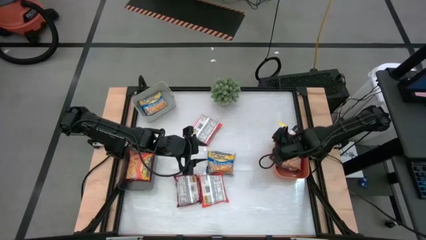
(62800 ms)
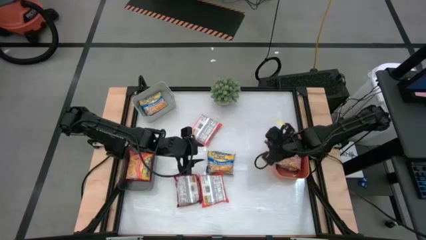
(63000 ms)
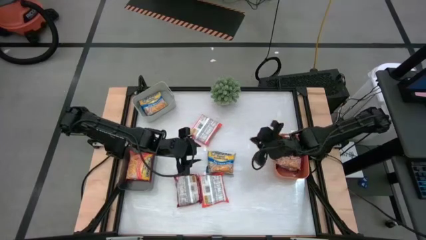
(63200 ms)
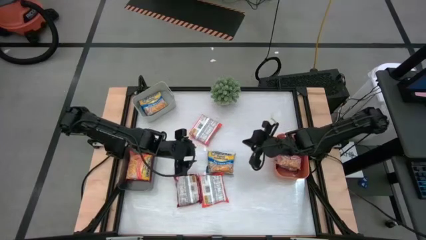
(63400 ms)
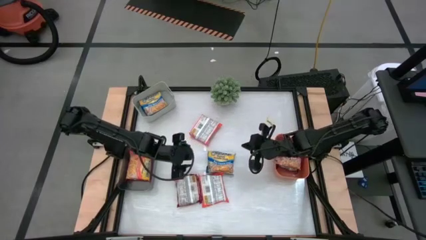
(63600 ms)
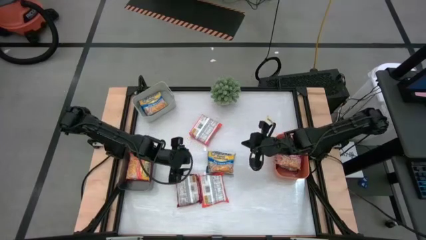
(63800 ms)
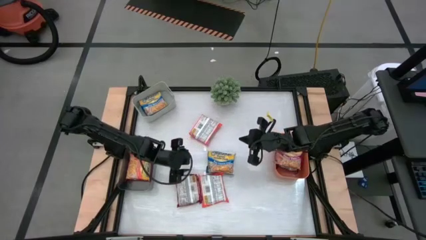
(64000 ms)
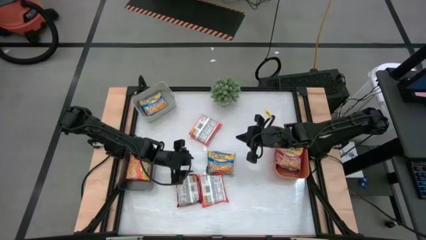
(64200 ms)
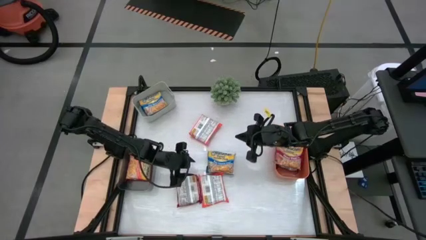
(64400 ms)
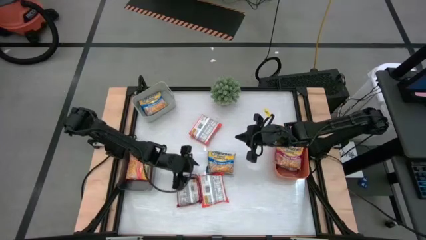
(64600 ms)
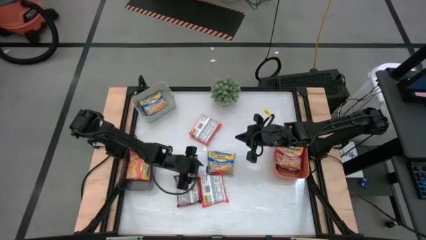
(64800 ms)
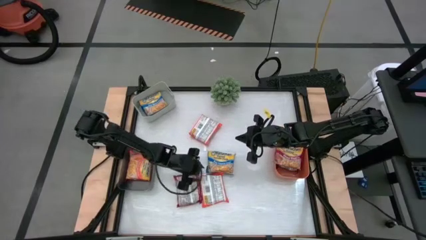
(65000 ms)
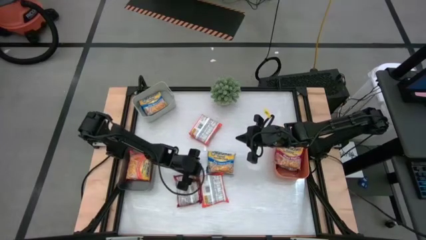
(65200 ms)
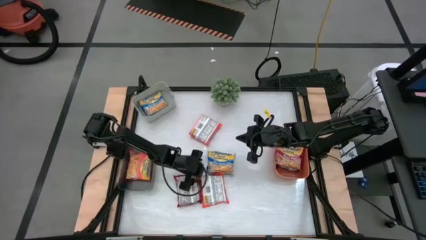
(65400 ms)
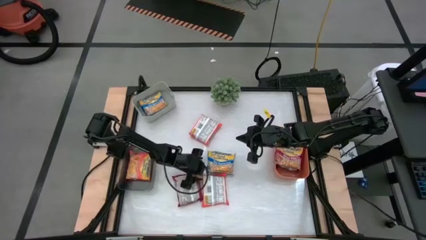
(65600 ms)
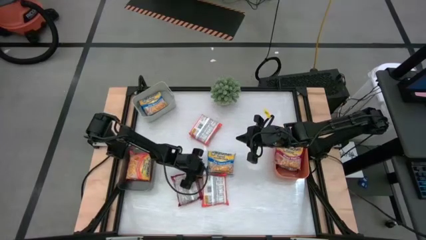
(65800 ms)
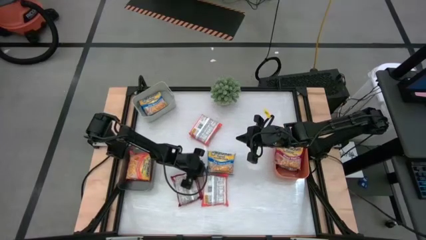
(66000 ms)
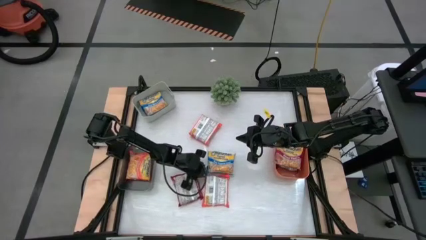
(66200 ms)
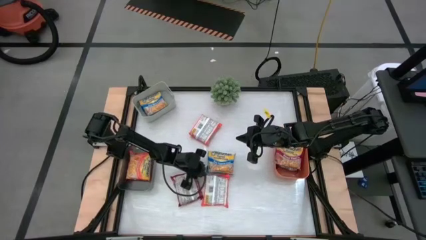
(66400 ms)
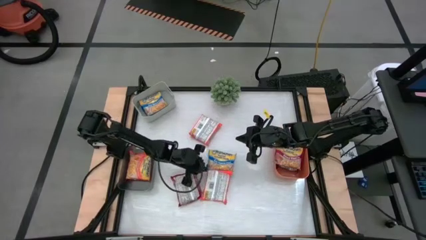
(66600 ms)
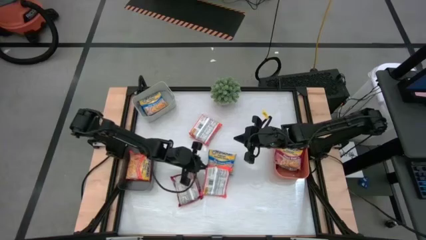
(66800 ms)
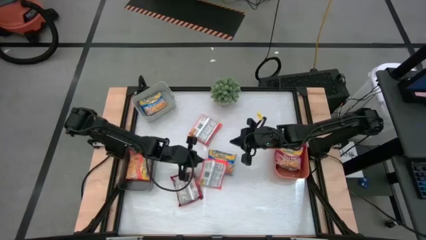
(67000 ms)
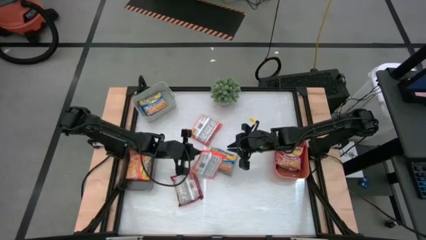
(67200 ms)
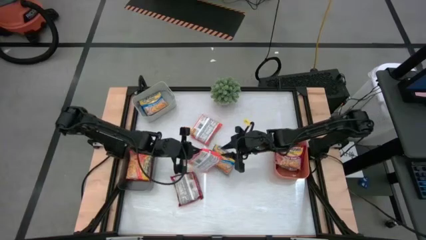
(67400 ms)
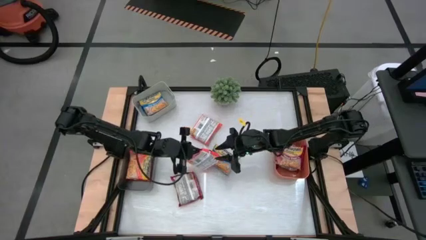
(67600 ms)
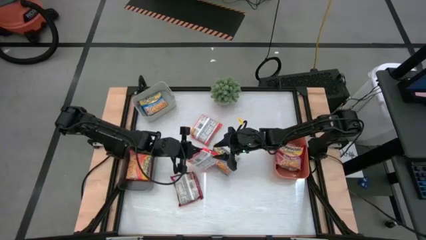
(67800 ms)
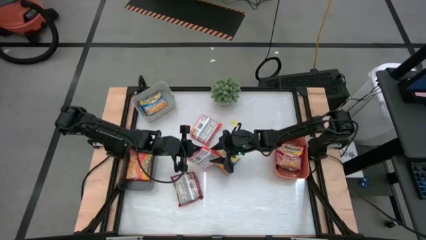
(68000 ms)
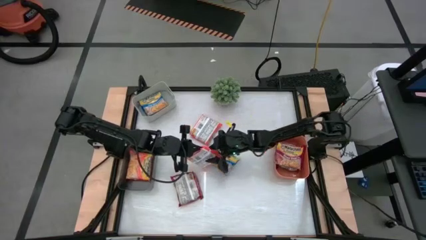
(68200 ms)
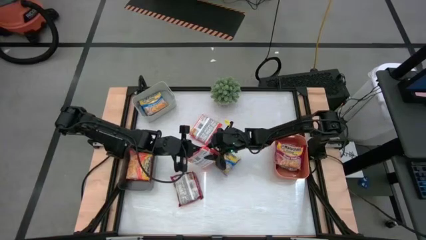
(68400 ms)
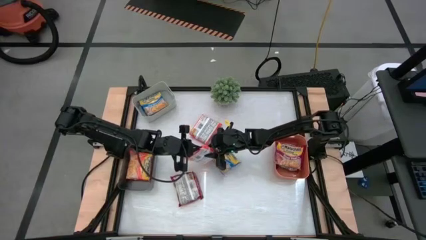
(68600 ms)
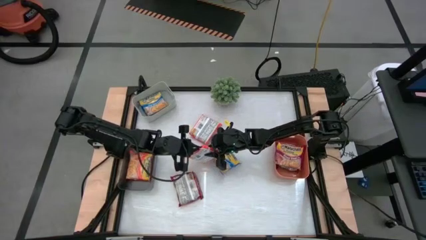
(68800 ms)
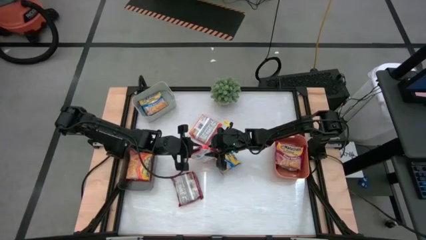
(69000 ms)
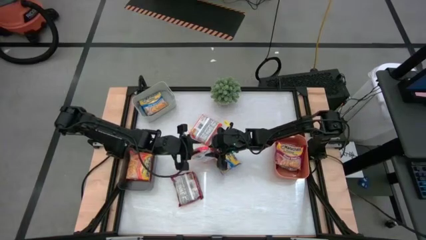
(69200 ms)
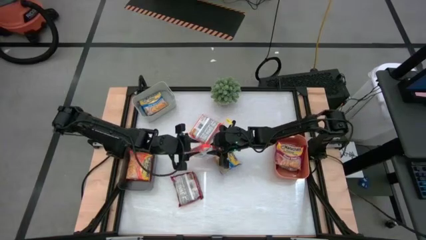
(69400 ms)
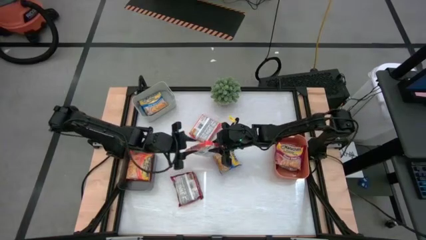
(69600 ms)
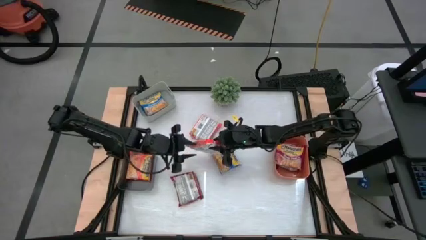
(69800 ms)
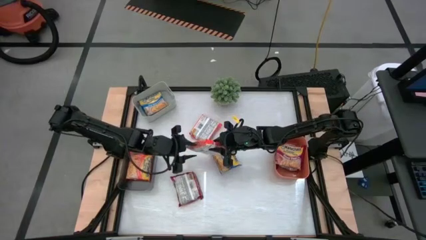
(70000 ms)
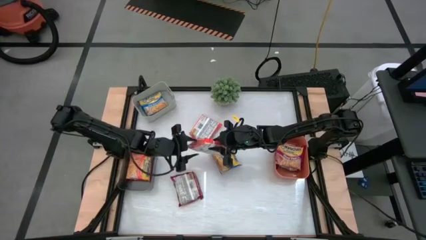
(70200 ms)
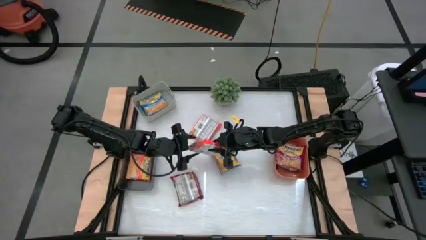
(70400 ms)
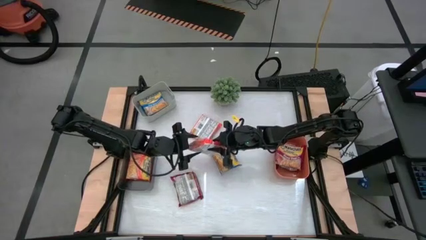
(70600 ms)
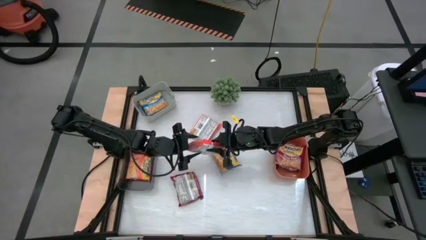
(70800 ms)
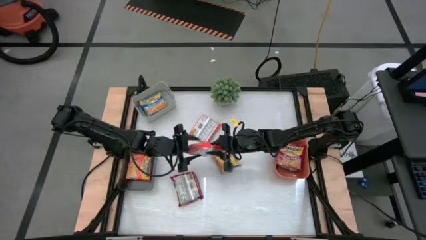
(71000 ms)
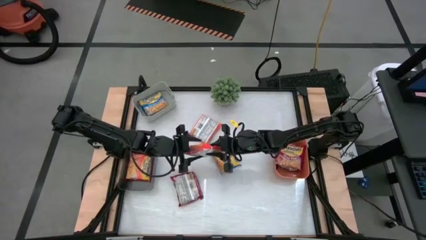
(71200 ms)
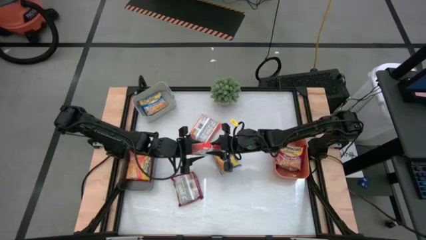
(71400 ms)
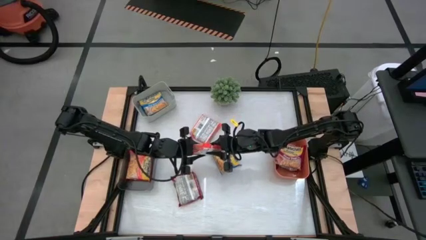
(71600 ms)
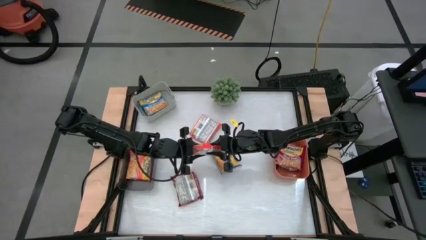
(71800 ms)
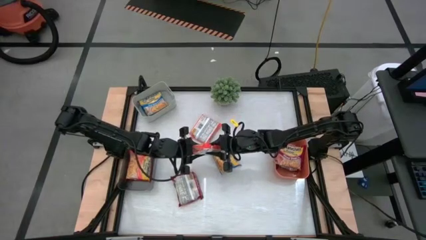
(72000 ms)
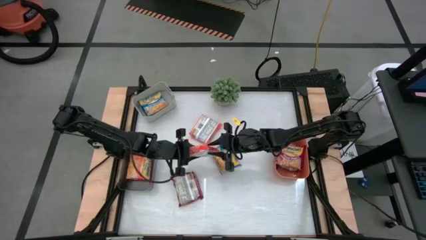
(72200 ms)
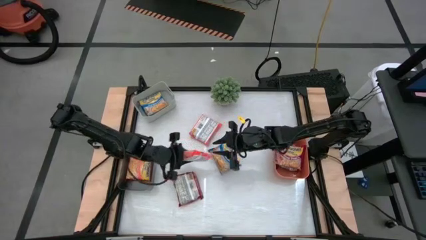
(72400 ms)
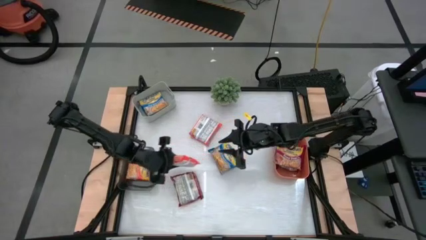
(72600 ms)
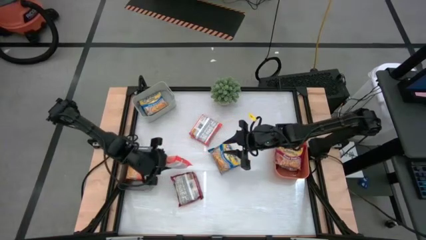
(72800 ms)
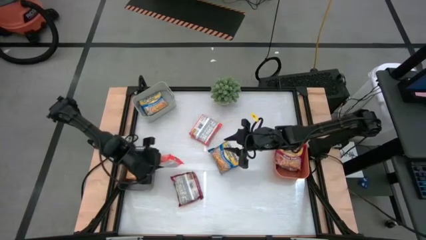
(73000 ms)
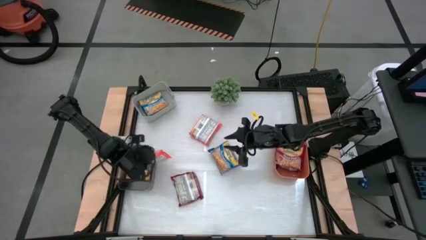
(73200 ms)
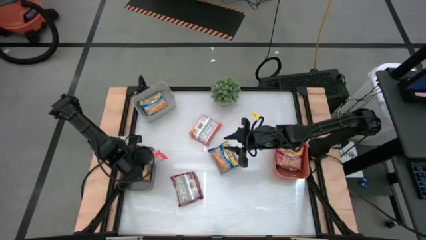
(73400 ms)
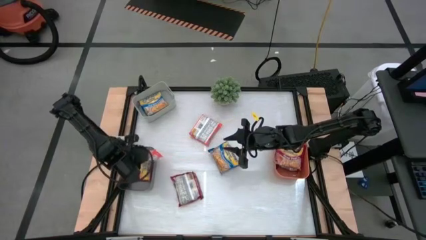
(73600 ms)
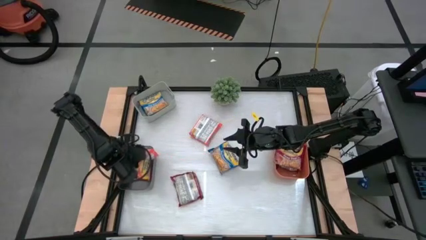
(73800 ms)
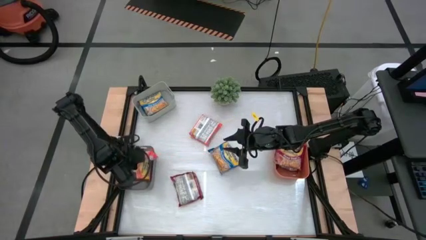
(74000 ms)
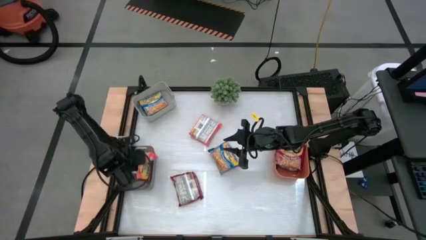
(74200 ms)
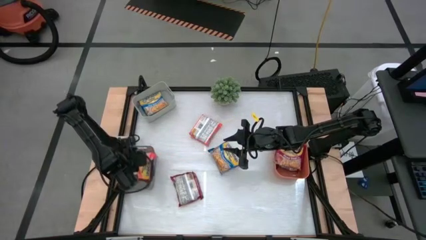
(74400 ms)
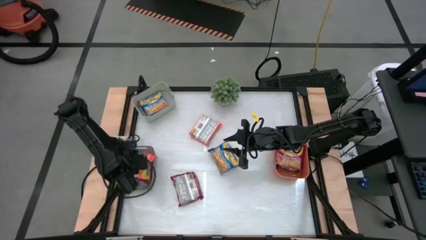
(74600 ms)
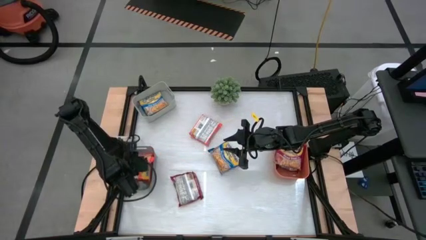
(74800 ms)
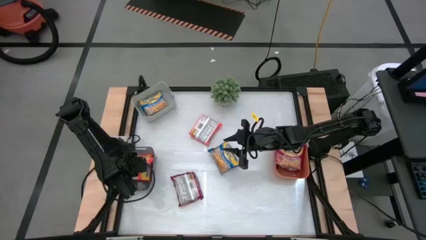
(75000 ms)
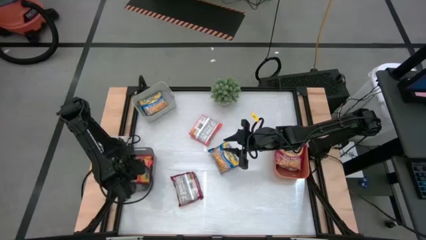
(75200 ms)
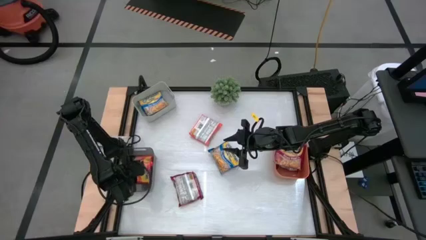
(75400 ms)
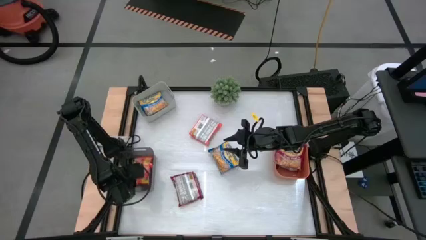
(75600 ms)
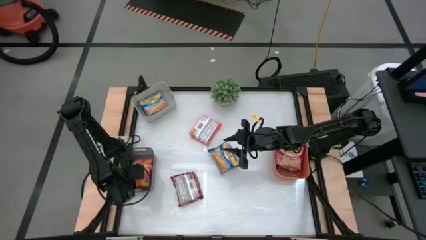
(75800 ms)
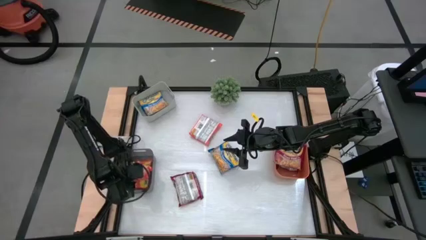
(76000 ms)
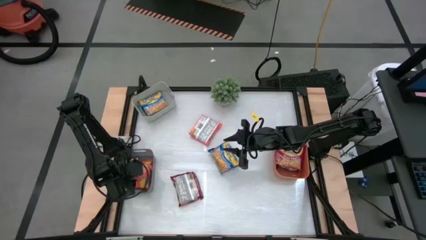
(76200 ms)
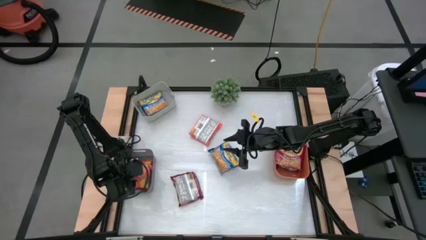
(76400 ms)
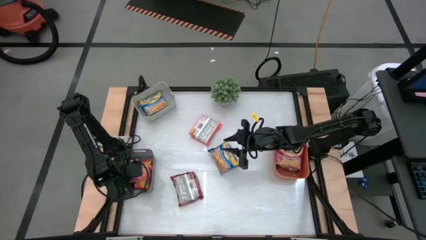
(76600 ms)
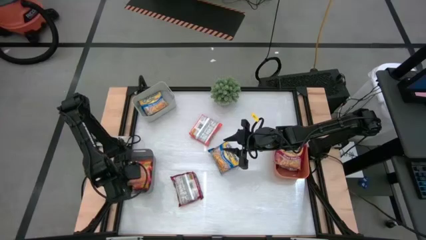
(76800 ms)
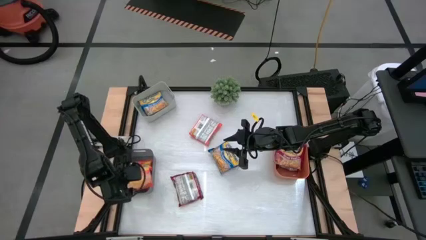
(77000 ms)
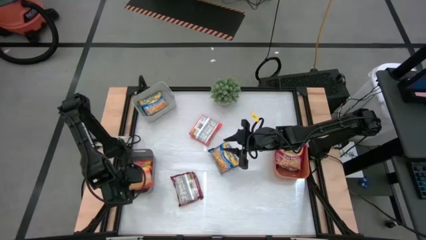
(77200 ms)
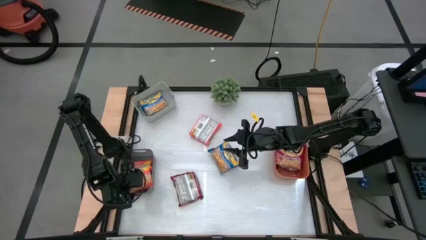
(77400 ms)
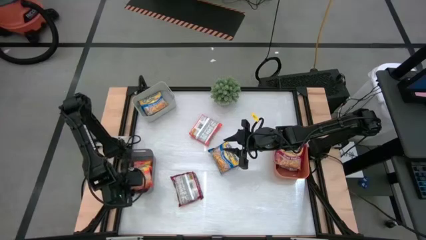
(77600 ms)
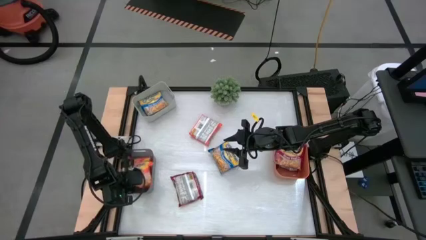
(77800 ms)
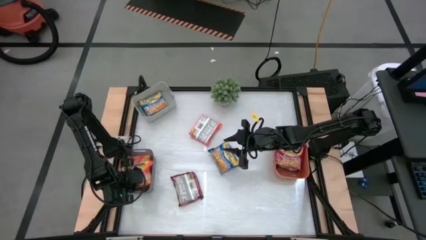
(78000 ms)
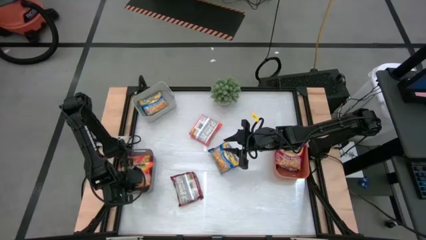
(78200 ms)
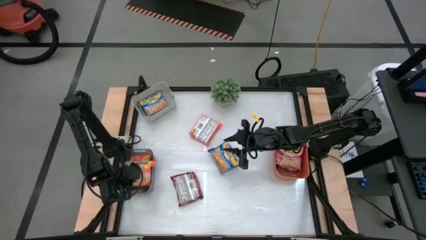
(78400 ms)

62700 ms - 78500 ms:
Task: Sort Maruchan noodles
Put the orange bag into the black bin
